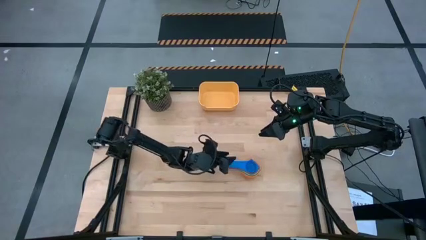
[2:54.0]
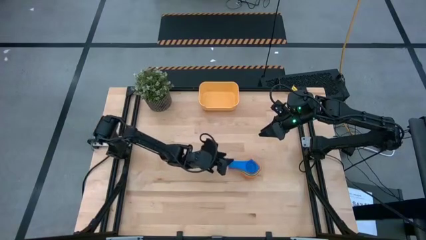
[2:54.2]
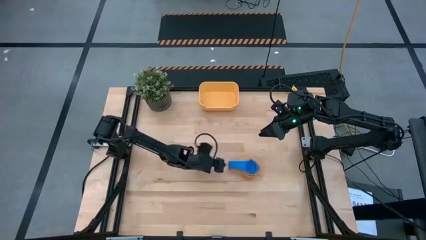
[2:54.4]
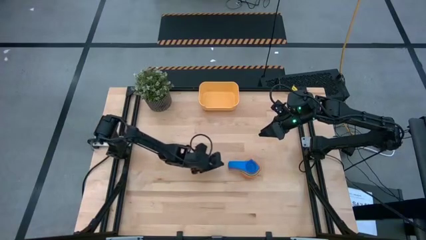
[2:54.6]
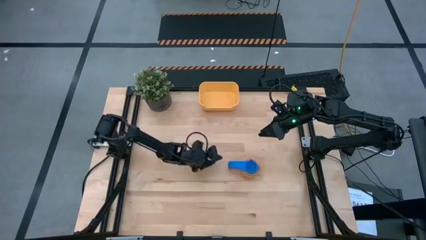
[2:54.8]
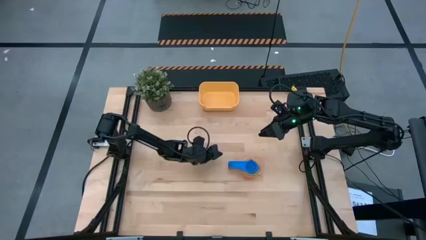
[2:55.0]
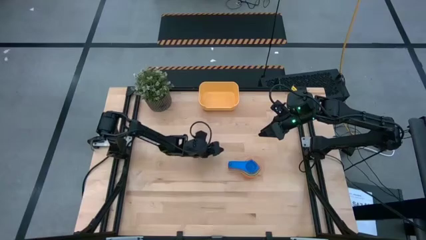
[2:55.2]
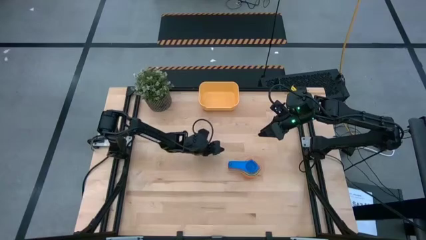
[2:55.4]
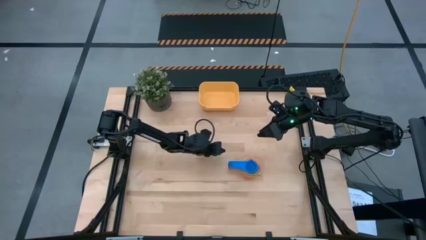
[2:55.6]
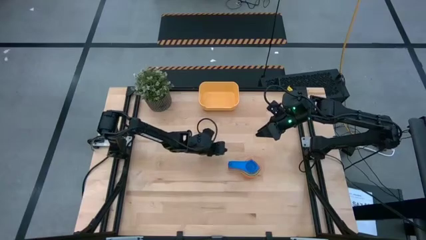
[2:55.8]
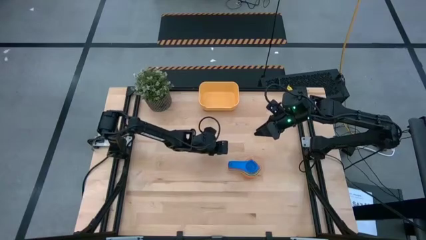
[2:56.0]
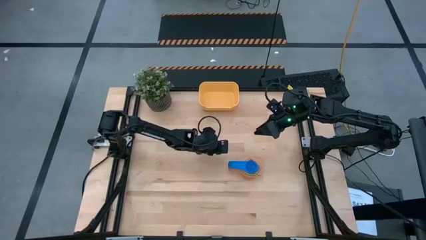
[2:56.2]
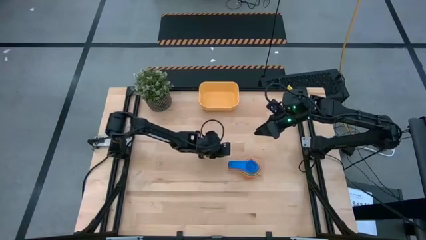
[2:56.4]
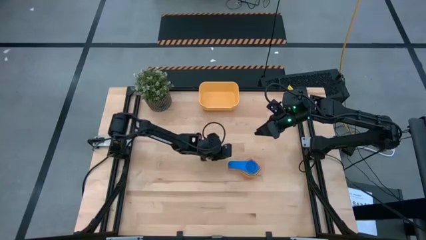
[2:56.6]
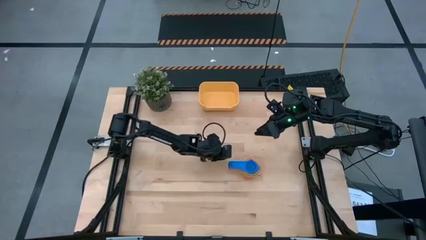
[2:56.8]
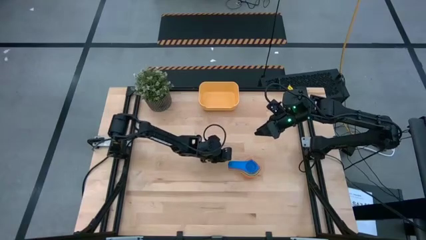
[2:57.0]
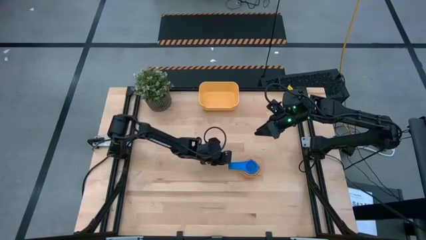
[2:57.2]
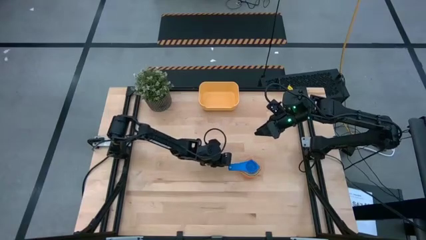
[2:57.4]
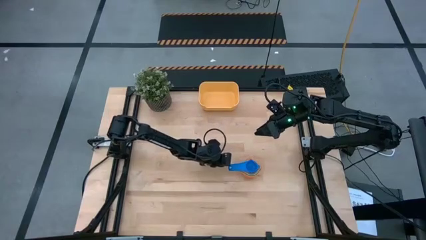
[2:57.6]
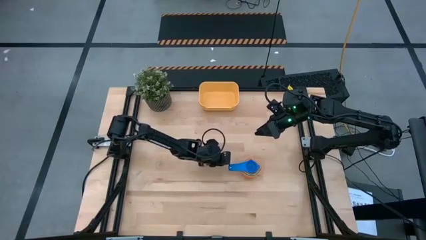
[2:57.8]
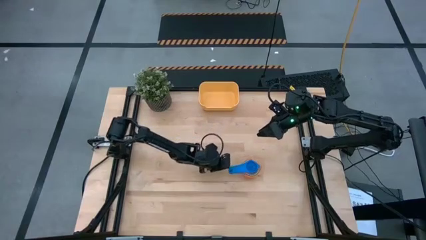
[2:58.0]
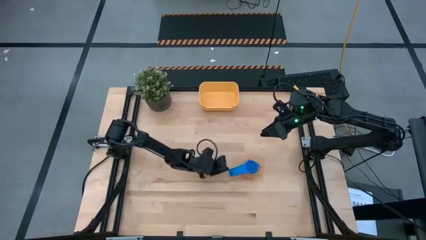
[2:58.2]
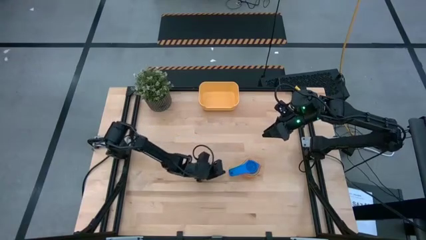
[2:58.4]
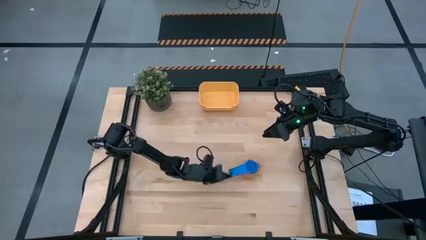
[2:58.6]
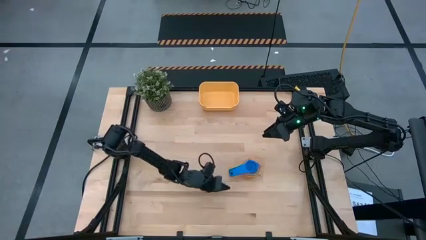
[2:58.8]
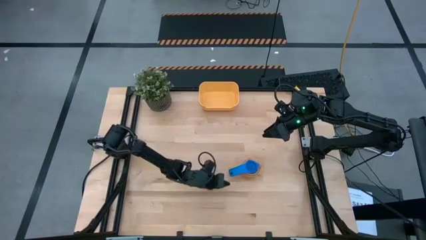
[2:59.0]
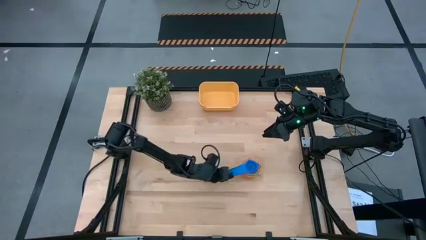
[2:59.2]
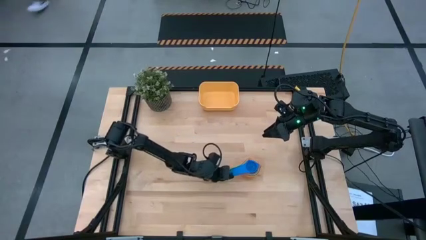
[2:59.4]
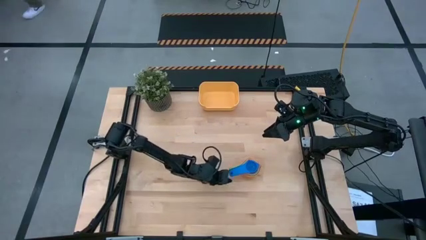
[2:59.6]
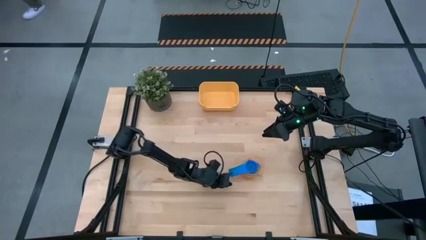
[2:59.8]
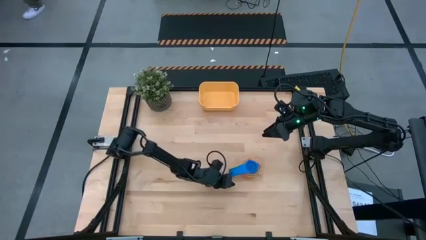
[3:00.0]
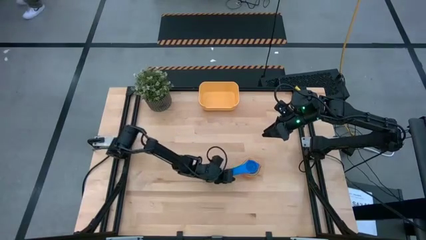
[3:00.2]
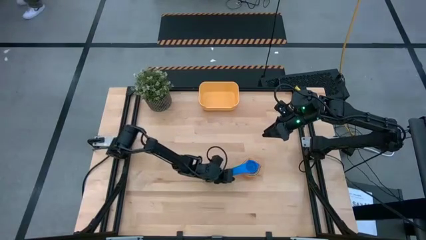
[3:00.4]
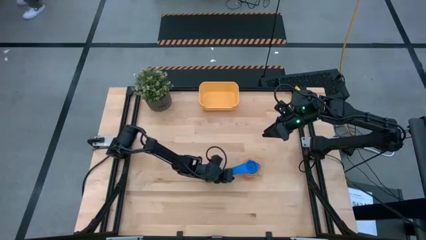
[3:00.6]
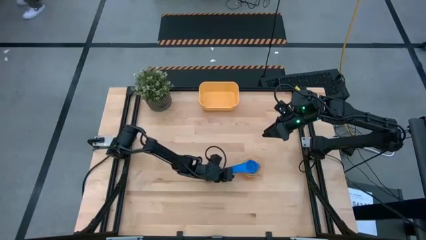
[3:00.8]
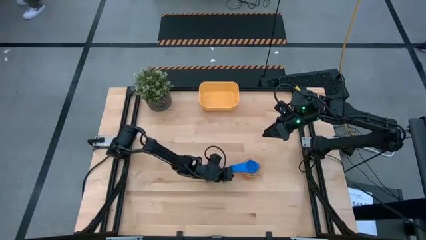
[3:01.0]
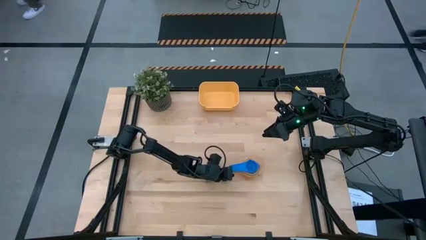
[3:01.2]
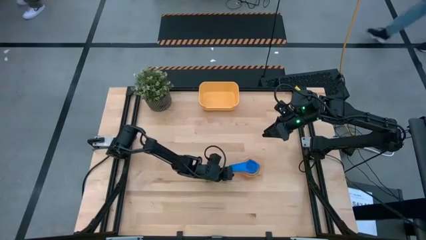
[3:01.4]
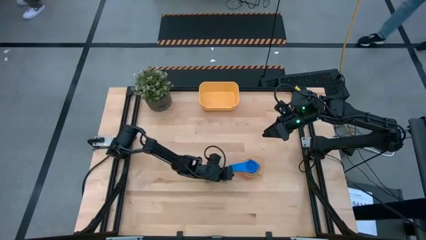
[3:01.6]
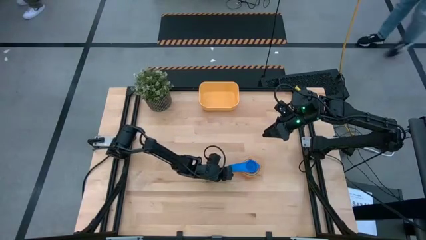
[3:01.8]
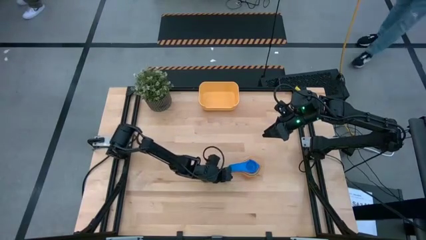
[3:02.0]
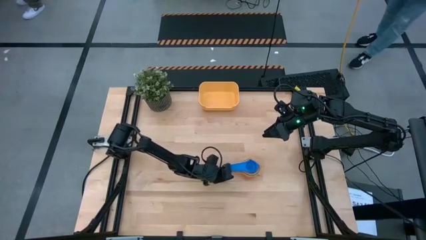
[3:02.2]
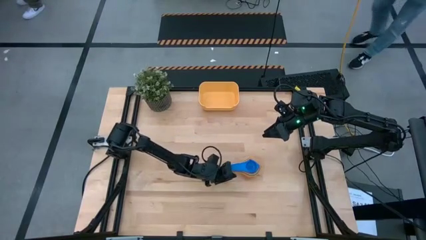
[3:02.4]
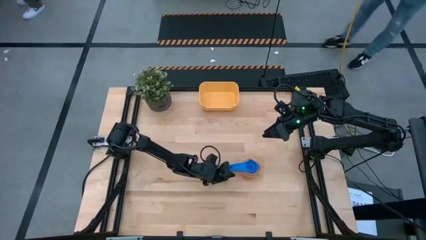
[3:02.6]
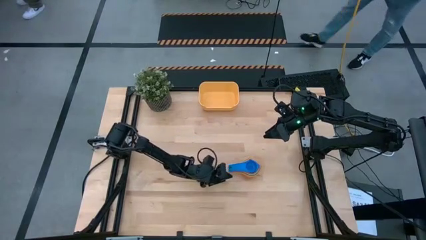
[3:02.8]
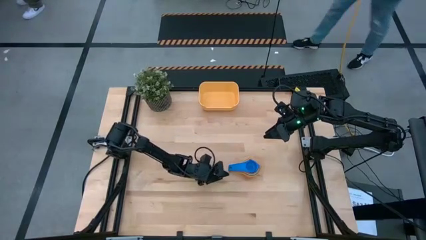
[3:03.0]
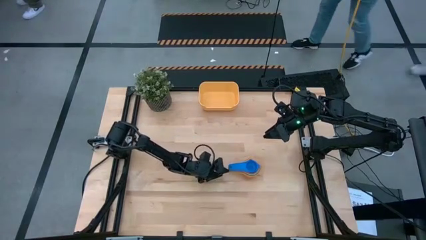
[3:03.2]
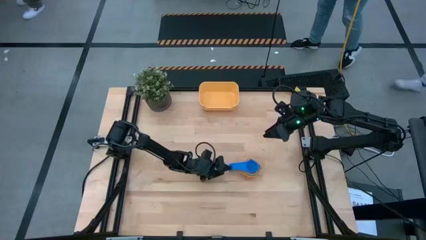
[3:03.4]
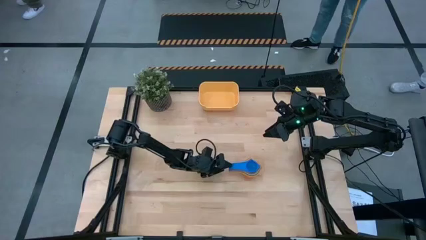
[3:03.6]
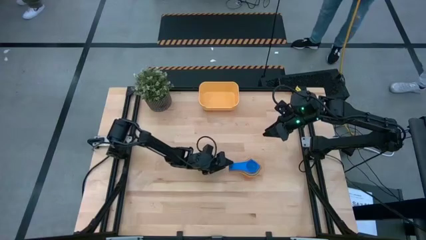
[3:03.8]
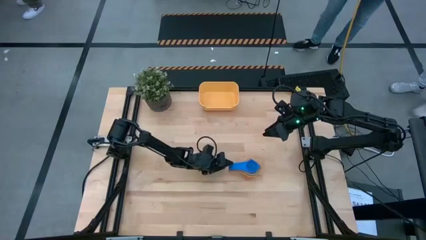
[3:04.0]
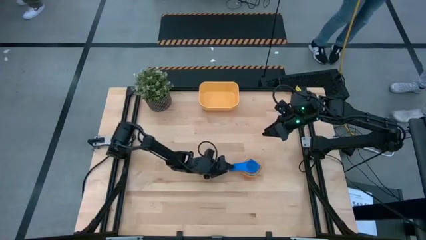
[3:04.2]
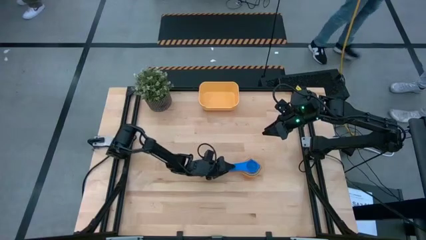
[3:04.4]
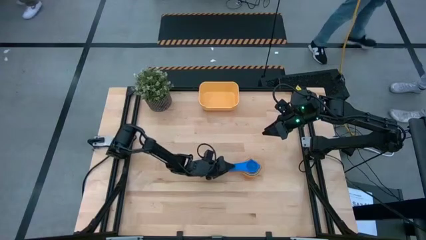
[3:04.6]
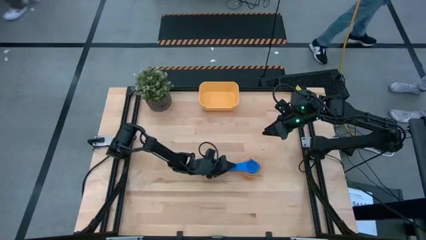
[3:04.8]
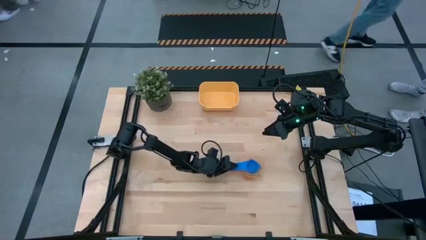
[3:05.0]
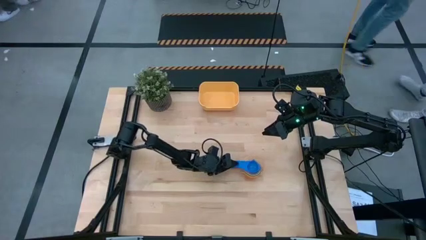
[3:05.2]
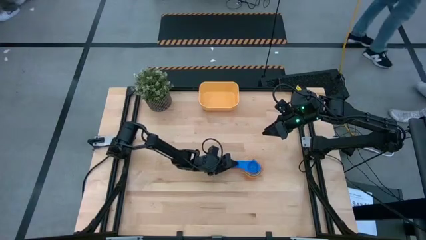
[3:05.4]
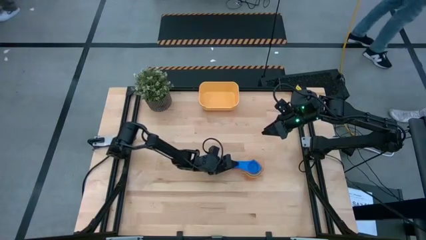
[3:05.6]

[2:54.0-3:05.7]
Task: Nest measuring cups in basket
Adjust the stacked measuring cups

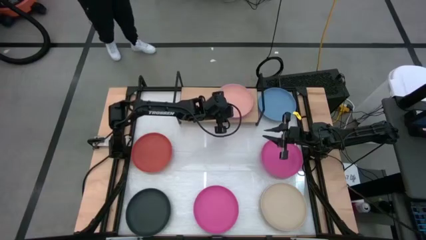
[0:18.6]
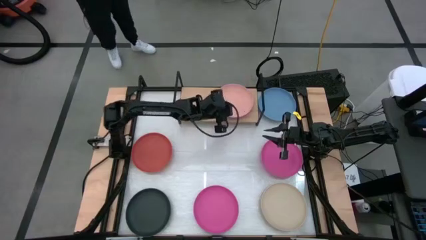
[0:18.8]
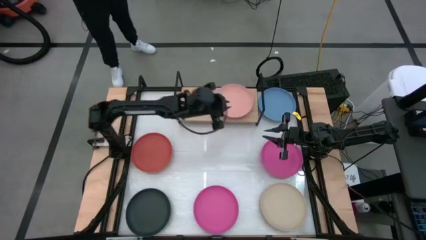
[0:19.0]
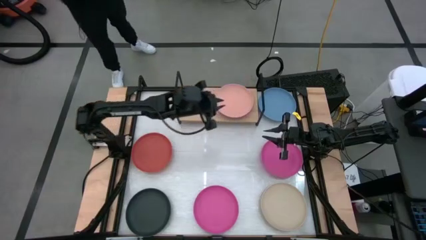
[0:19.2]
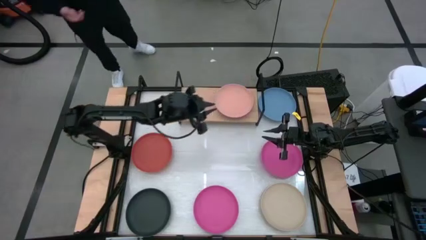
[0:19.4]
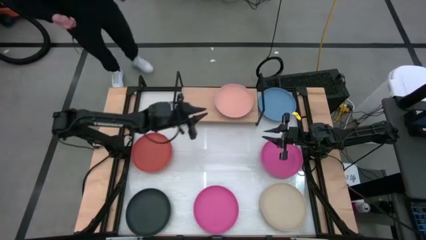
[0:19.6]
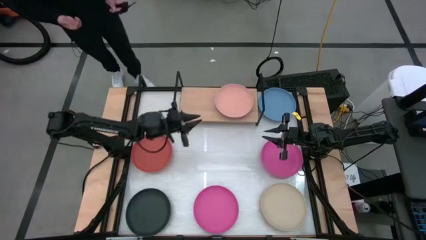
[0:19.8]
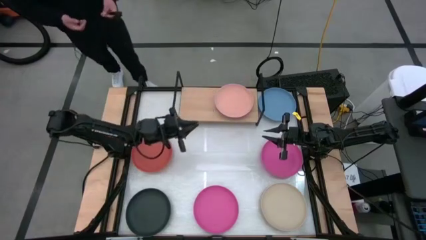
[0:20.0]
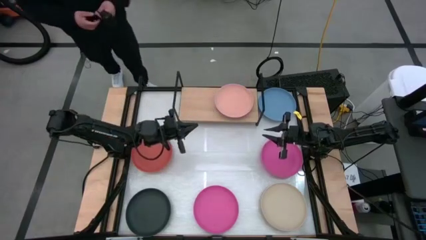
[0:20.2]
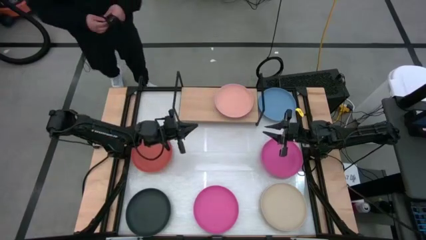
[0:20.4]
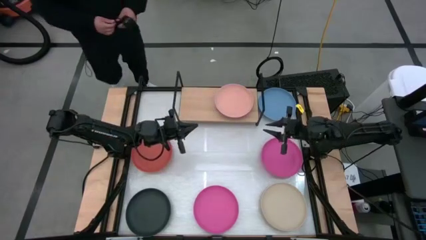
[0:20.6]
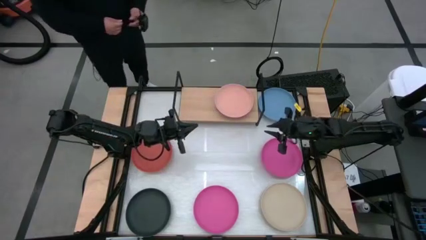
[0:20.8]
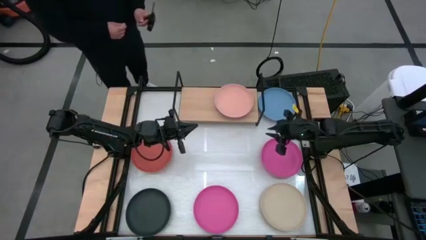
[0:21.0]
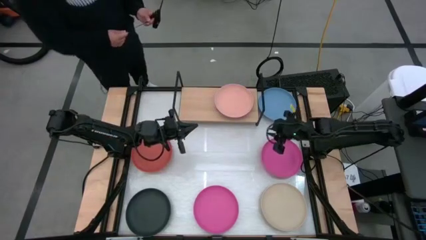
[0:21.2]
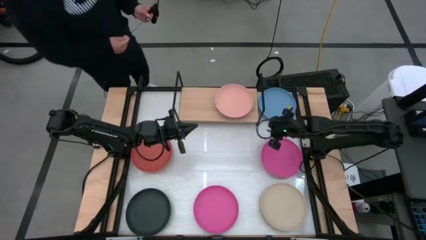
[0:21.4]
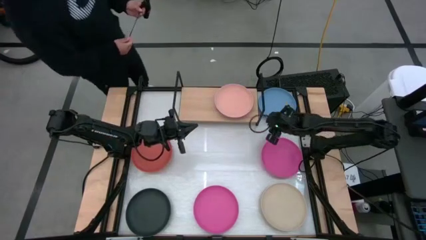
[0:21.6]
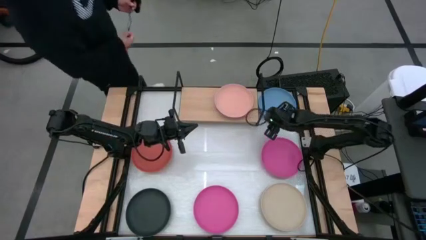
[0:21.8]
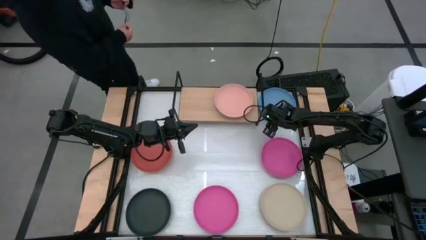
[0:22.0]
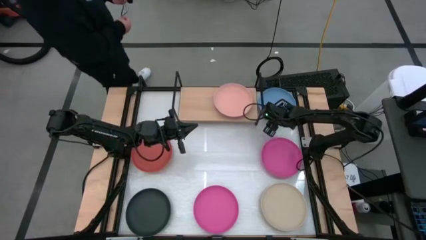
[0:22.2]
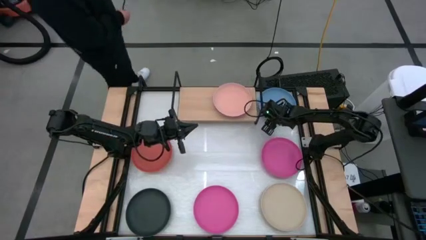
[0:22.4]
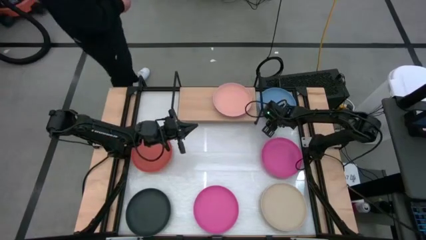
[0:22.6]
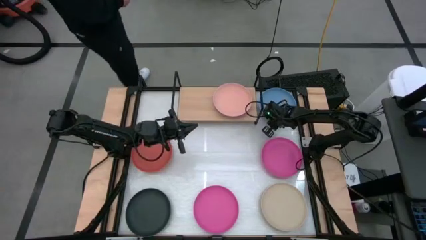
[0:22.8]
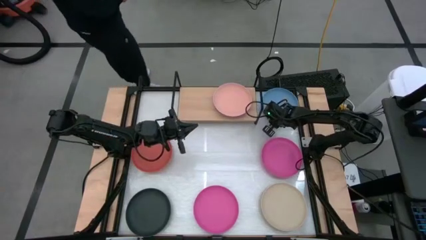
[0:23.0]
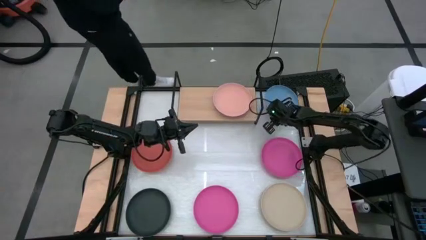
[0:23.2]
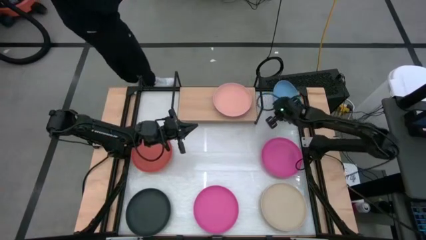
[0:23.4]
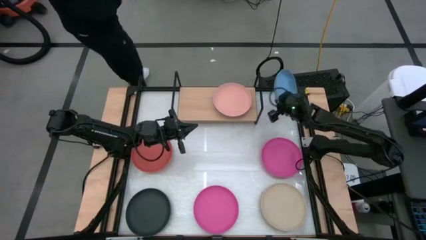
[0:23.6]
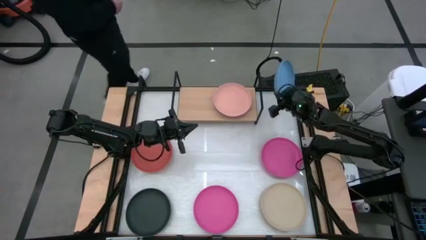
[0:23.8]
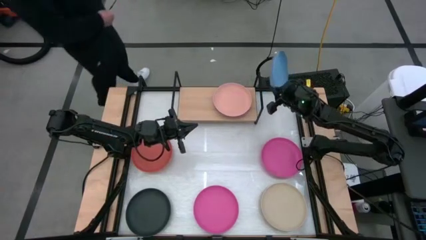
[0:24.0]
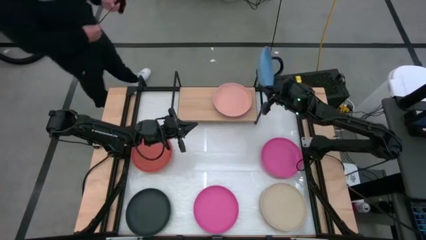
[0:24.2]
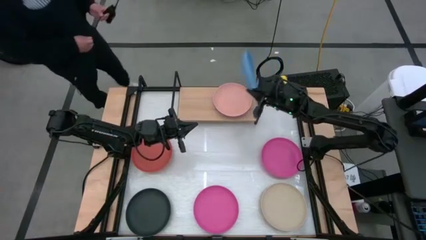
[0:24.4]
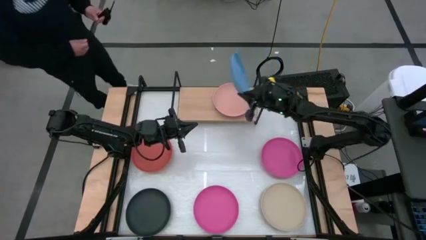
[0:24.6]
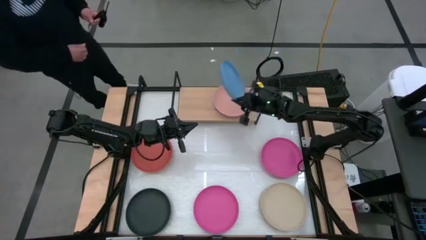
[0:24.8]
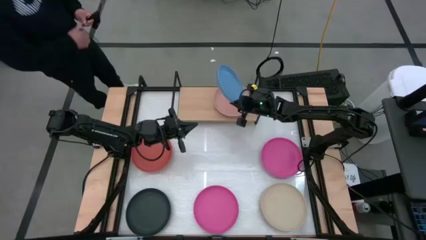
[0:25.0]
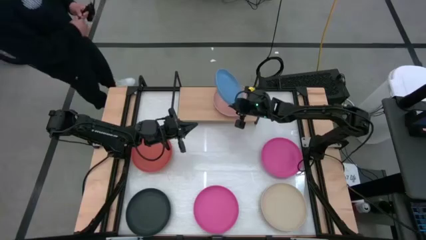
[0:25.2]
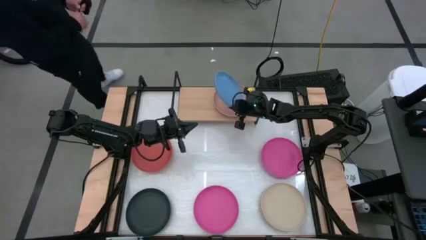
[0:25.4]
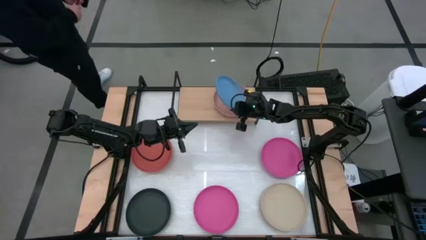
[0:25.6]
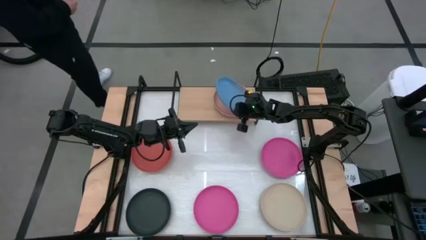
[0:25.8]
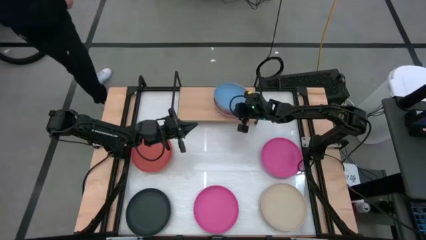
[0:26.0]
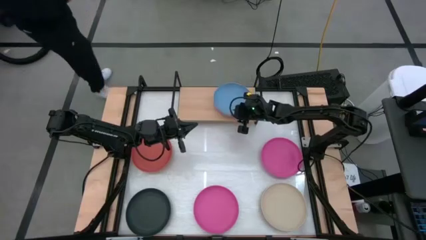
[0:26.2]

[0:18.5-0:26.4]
Task: Place and stack plates onto a shelf
Stack the blue plate on top of the light orange plate on the shelf
